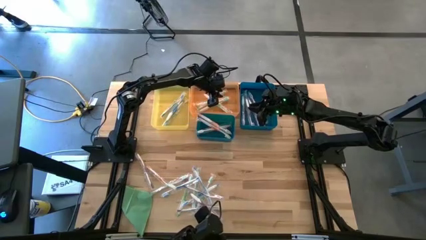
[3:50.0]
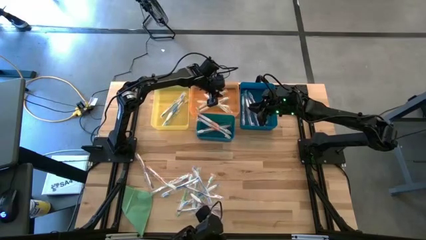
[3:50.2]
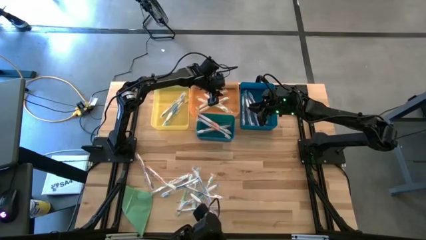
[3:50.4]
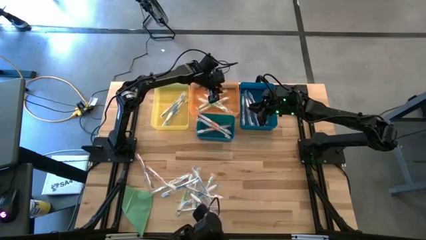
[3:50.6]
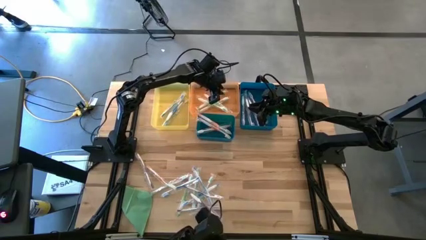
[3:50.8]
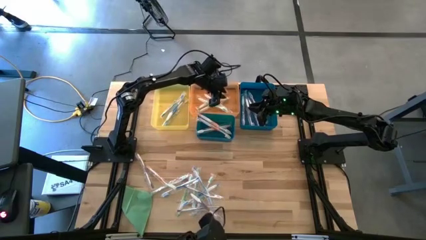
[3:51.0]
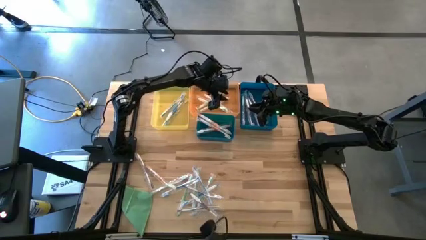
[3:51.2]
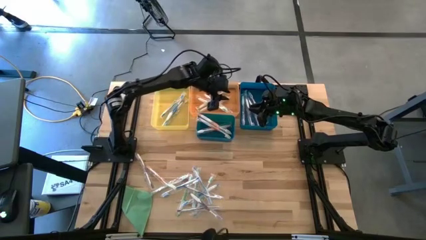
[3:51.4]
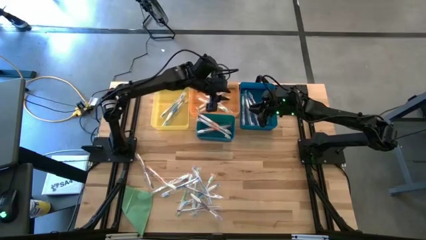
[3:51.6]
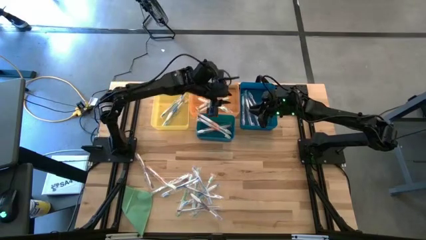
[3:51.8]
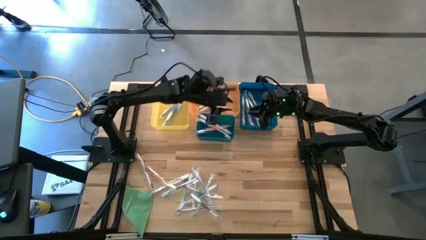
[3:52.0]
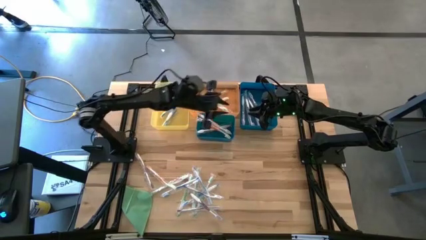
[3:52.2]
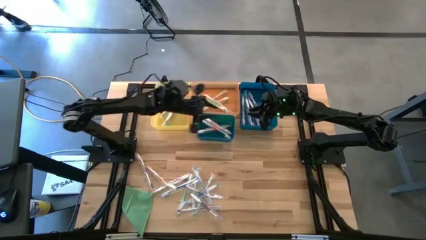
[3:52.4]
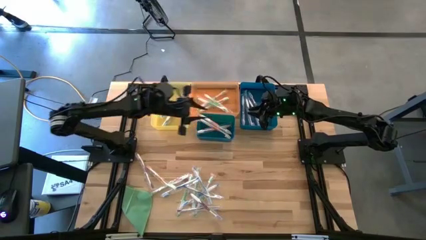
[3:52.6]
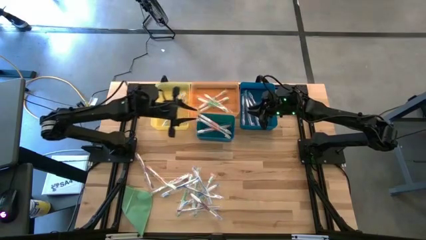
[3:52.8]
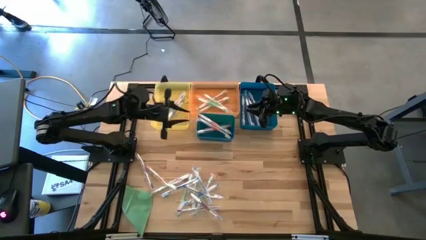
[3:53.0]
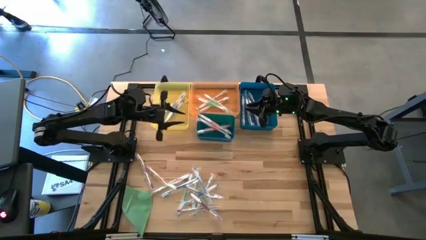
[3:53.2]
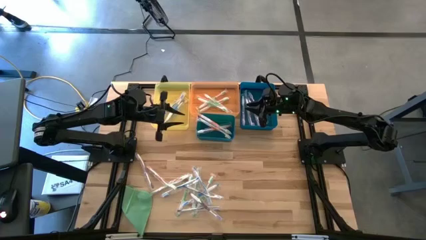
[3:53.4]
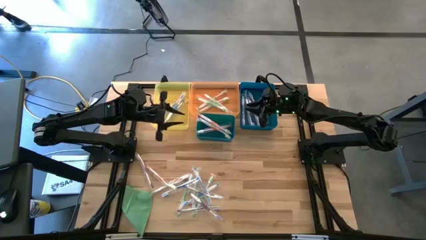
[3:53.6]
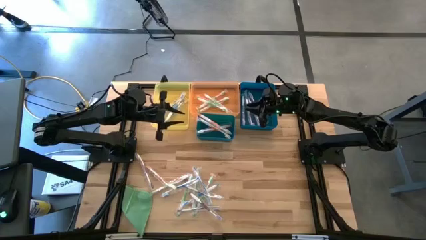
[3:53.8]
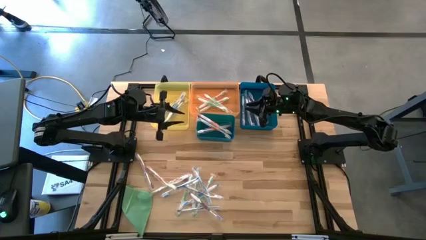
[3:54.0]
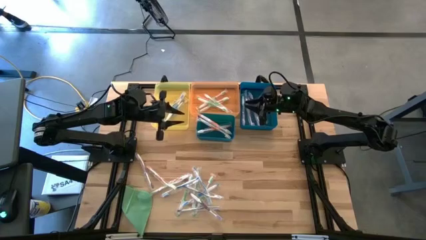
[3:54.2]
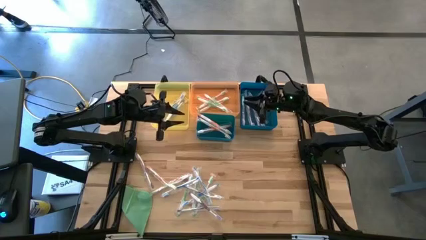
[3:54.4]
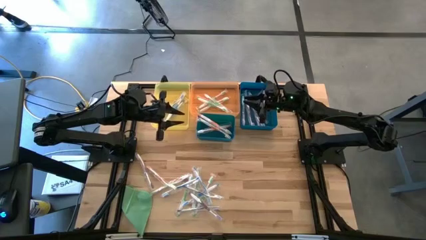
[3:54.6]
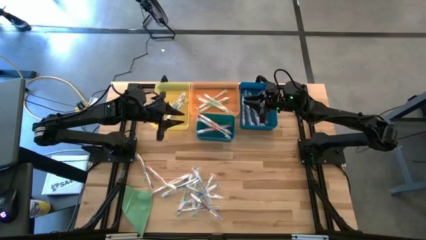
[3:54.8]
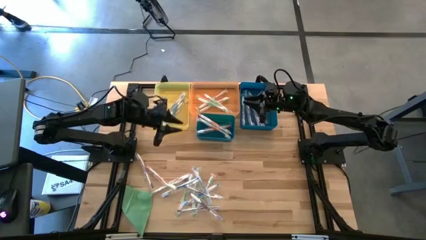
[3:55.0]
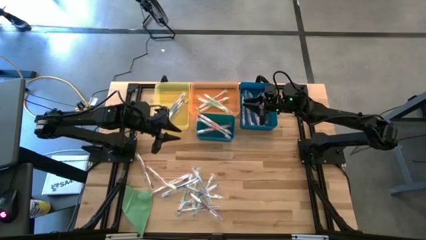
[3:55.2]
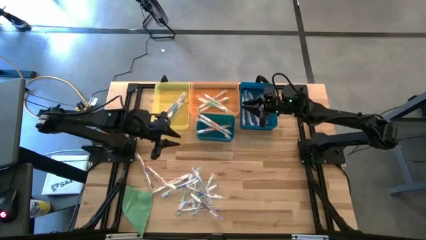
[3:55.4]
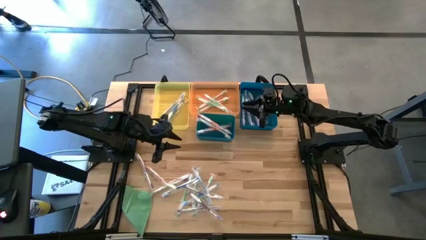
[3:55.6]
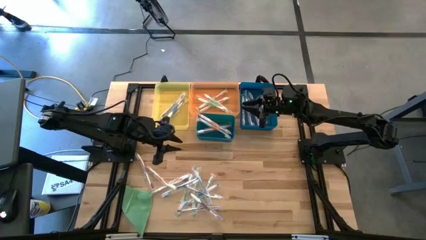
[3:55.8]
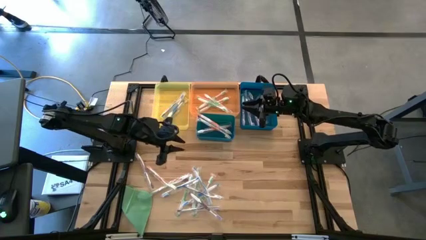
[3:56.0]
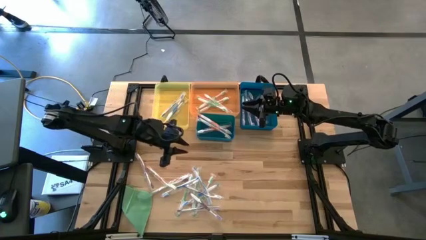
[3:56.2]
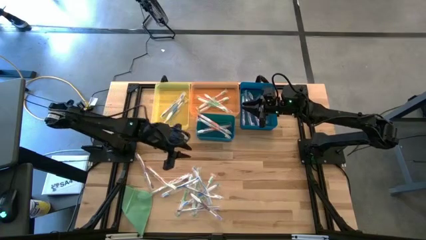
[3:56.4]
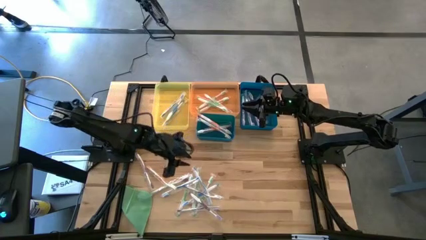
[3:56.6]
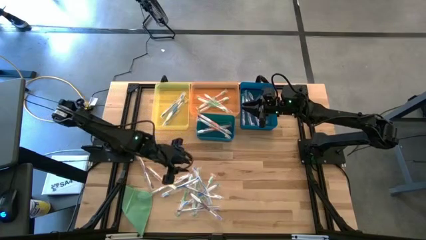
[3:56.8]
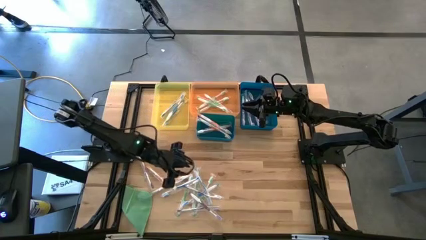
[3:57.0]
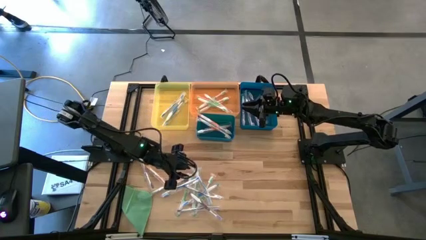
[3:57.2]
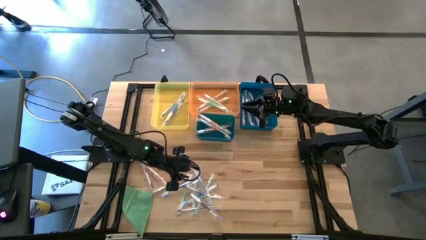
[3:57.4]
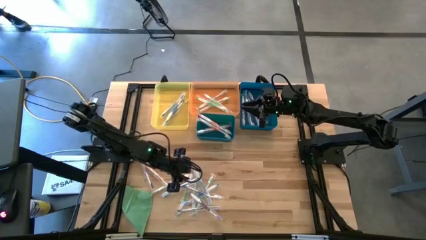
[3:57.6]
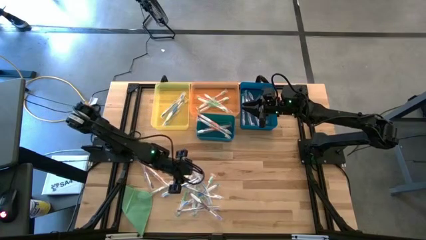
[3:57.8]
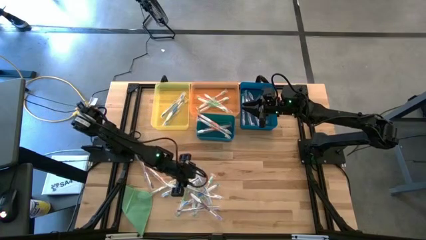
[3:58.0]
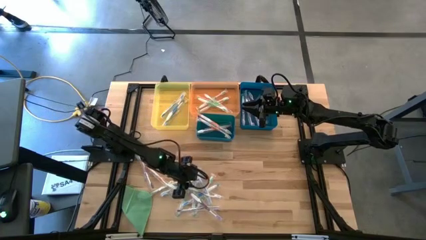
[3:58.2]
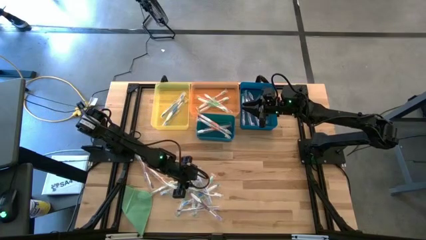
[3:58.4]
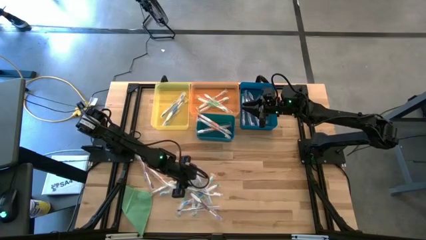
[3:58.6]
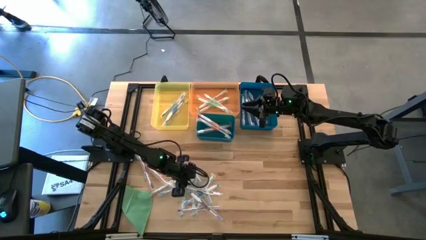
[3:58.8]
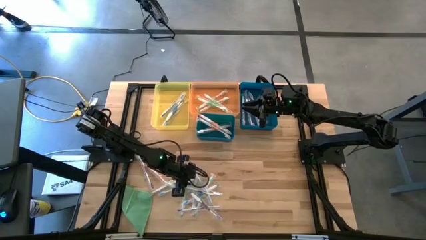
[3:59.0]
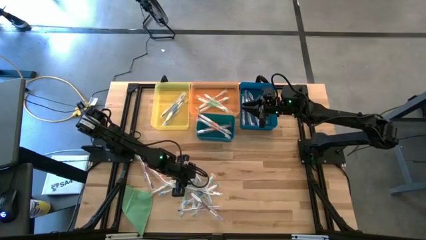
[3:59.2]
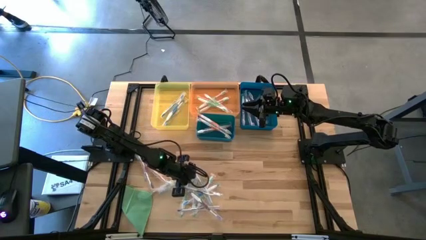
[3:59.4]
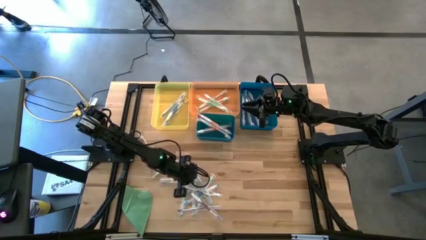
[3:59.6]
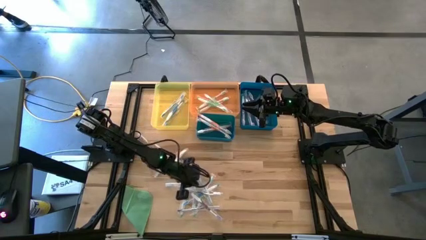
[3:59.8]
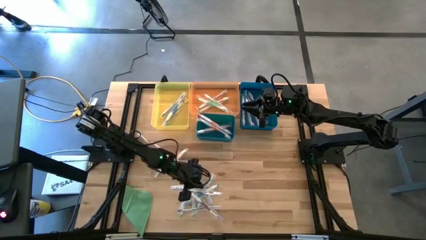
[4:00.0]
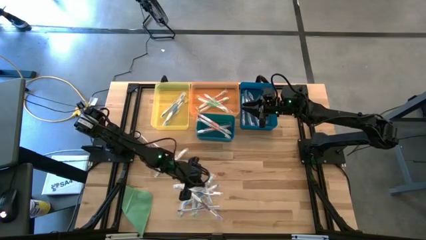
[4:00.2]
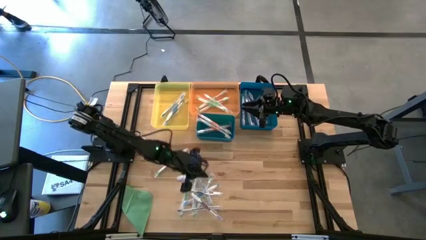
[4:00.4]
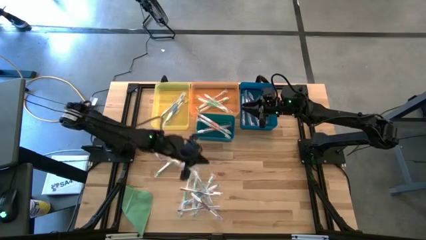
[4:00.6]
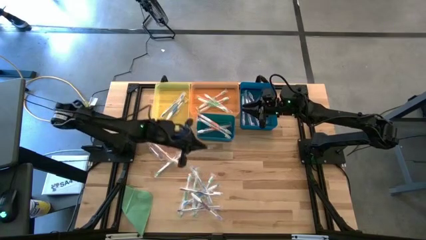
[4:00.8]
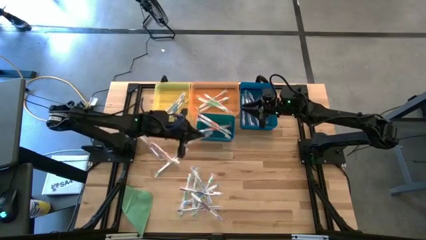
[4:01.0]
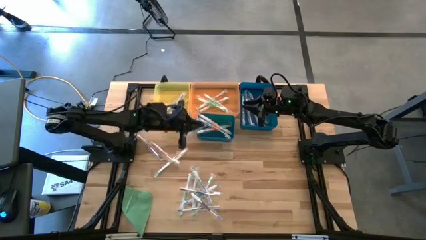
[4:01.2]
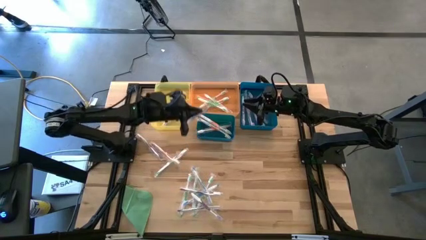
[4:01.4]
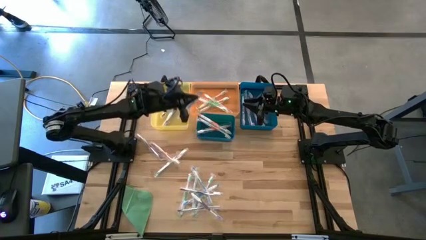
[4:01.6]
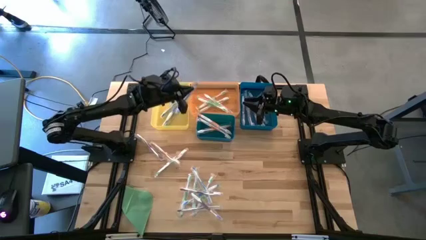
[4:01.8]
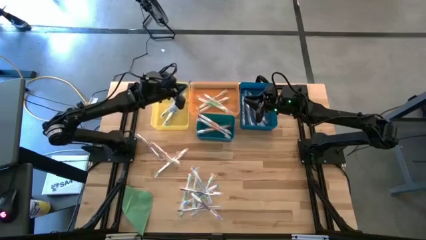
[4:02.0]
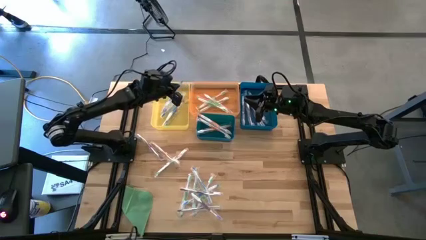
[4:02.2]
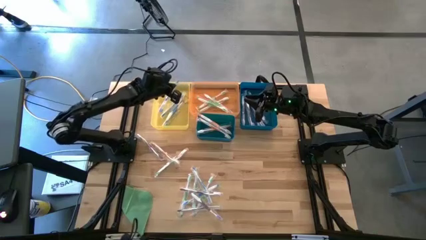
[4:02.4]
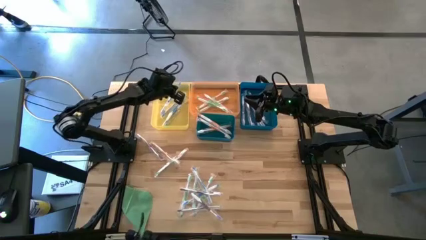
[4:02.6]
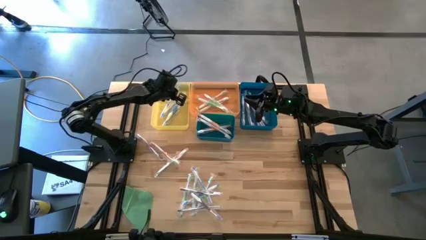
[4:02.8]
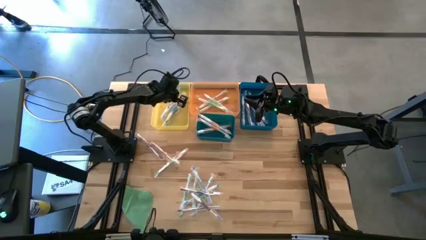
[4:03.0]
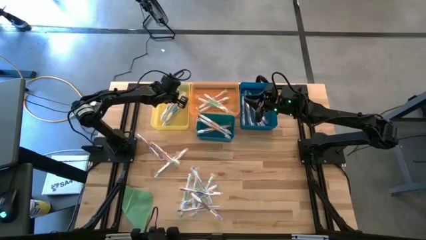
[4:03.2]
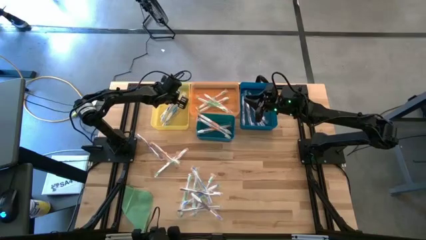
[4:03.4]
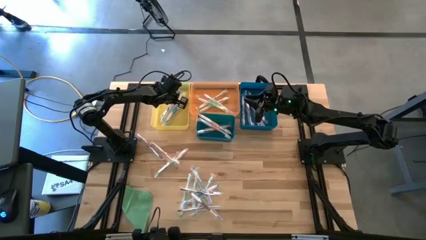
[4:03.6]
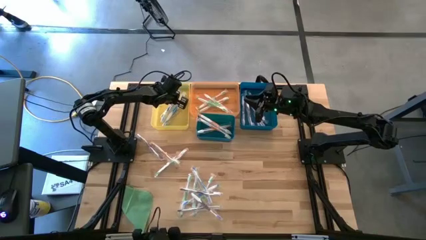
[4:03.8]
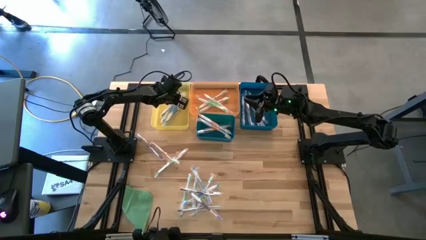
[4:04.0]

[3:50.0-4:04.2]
Task: Pick & Place Toothbrushes
Put the blue toothbrush into the yellow bin
